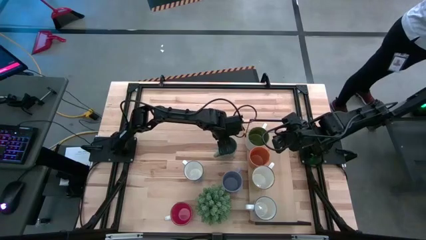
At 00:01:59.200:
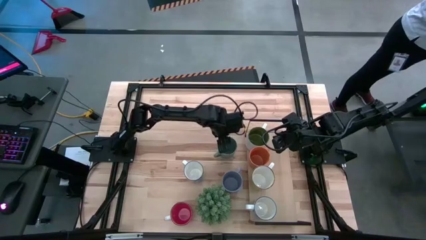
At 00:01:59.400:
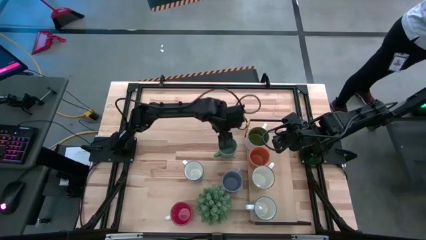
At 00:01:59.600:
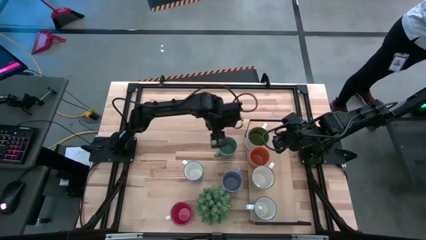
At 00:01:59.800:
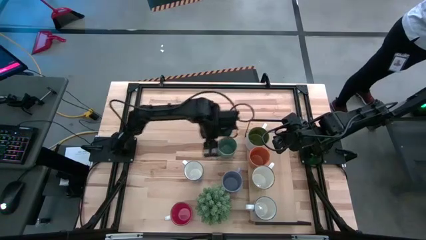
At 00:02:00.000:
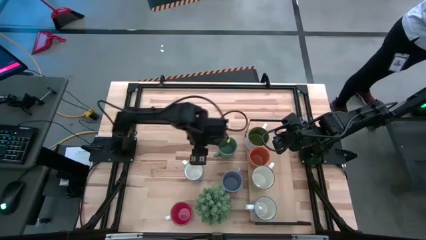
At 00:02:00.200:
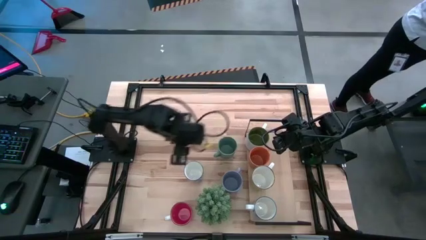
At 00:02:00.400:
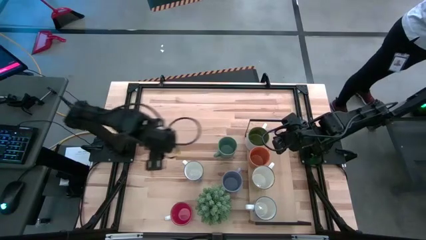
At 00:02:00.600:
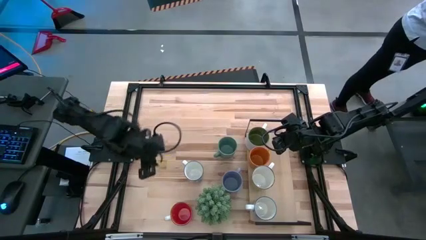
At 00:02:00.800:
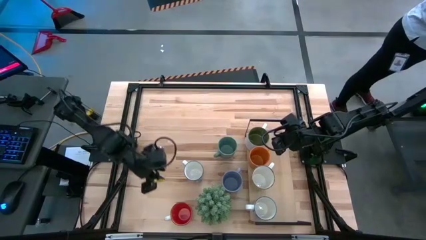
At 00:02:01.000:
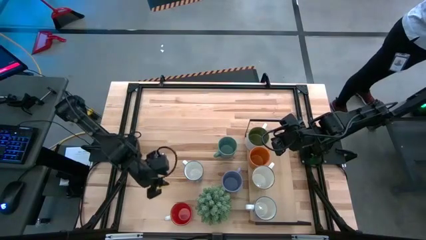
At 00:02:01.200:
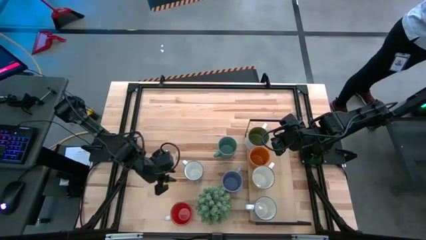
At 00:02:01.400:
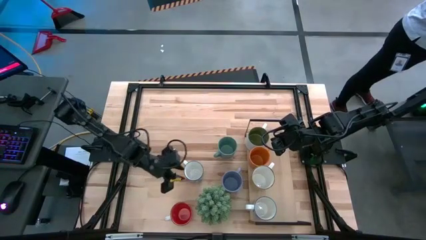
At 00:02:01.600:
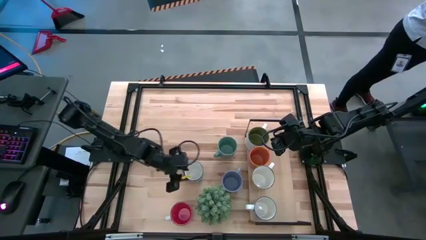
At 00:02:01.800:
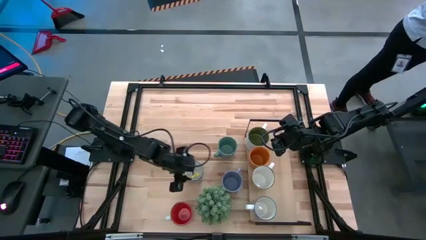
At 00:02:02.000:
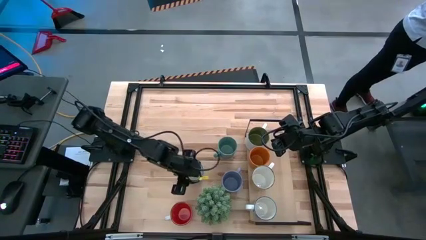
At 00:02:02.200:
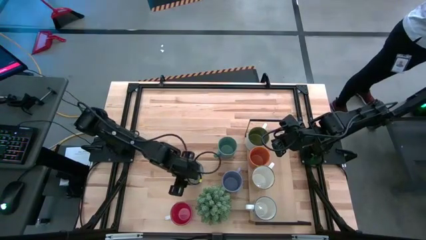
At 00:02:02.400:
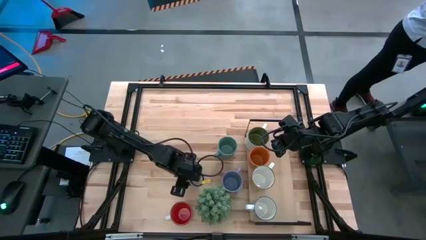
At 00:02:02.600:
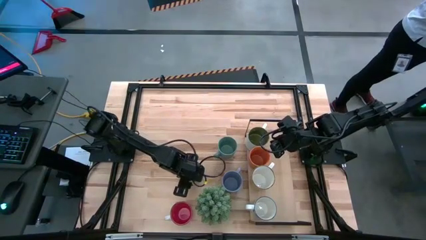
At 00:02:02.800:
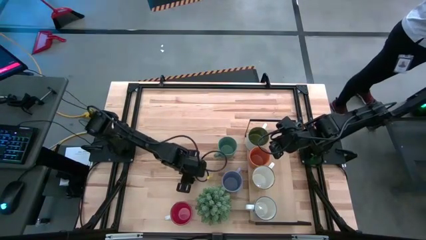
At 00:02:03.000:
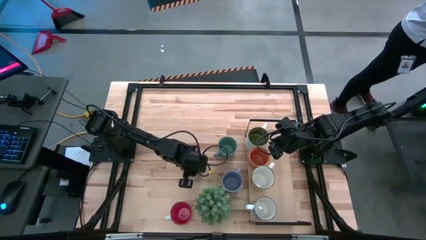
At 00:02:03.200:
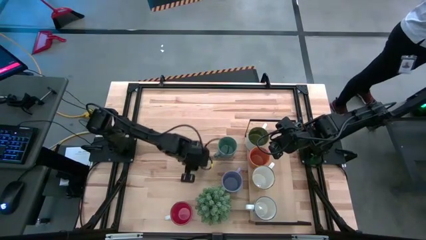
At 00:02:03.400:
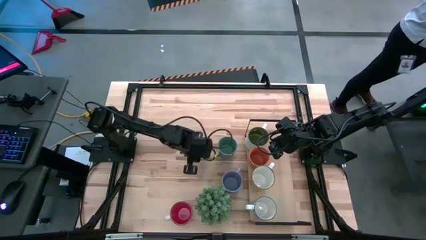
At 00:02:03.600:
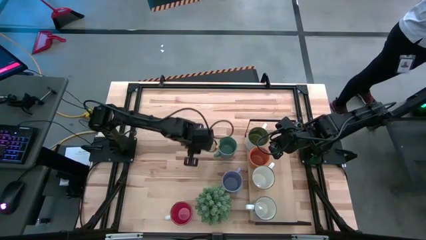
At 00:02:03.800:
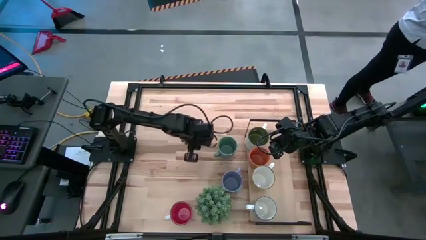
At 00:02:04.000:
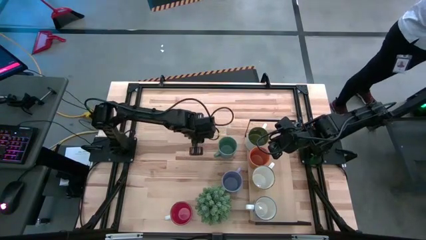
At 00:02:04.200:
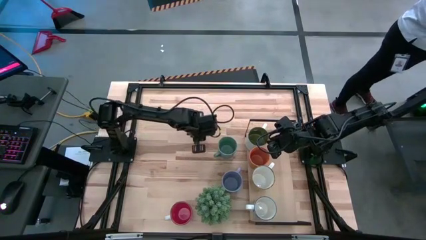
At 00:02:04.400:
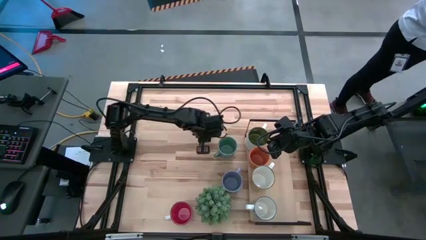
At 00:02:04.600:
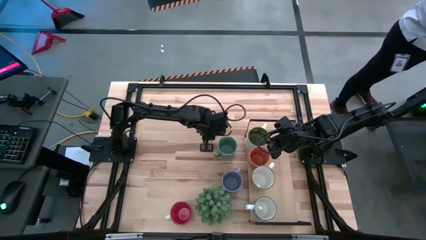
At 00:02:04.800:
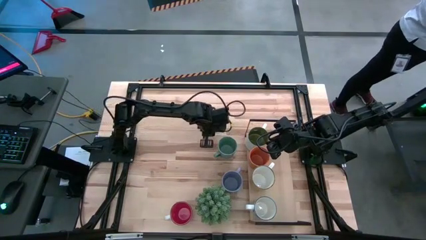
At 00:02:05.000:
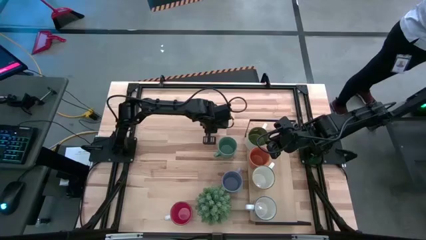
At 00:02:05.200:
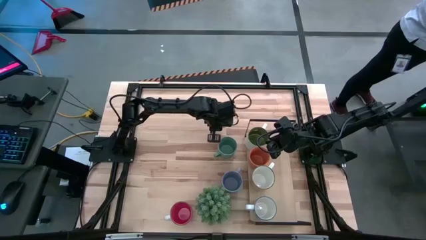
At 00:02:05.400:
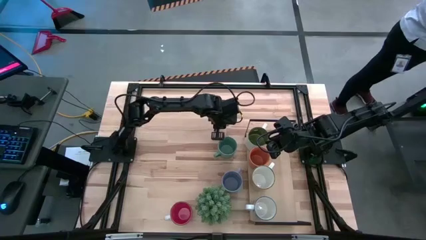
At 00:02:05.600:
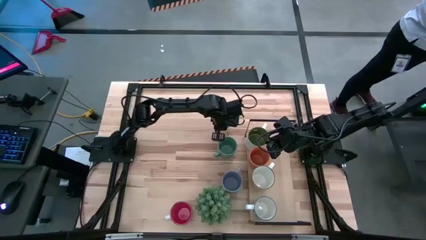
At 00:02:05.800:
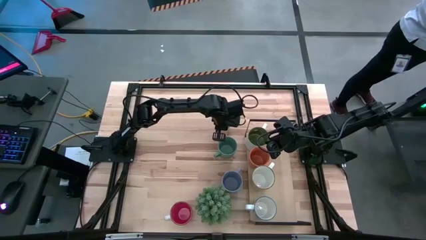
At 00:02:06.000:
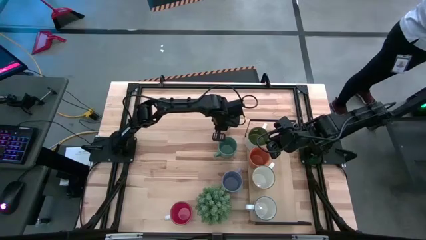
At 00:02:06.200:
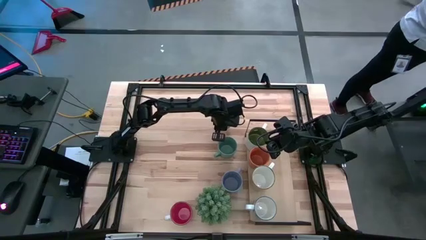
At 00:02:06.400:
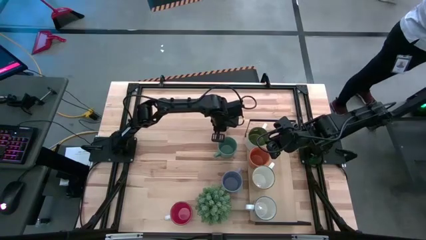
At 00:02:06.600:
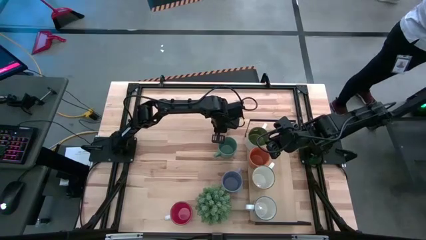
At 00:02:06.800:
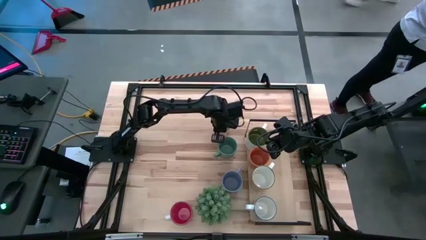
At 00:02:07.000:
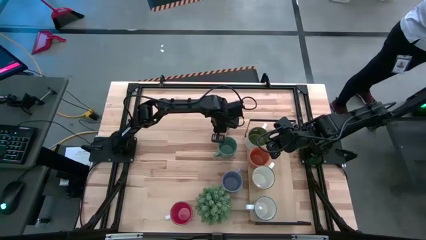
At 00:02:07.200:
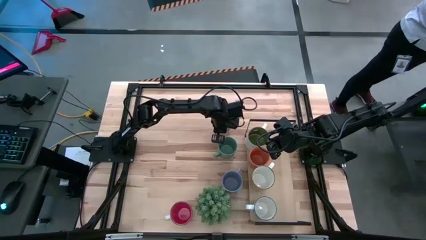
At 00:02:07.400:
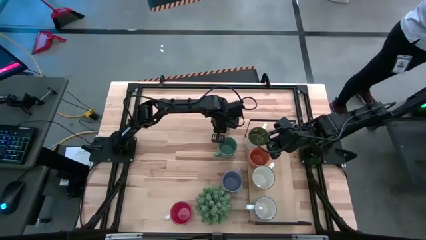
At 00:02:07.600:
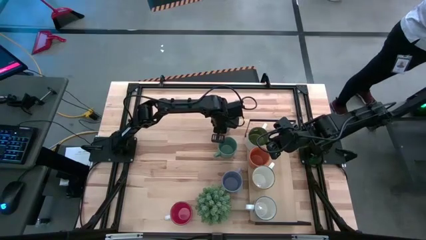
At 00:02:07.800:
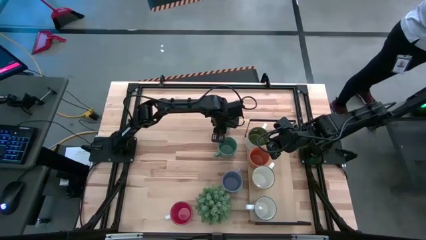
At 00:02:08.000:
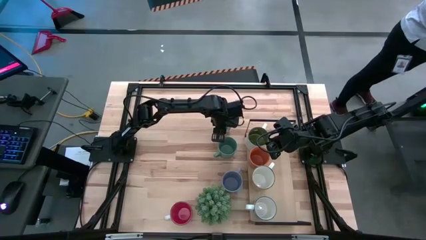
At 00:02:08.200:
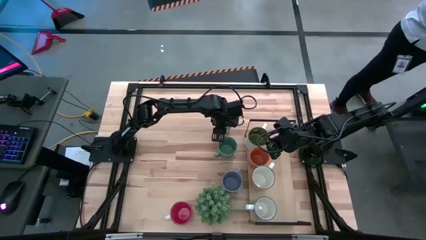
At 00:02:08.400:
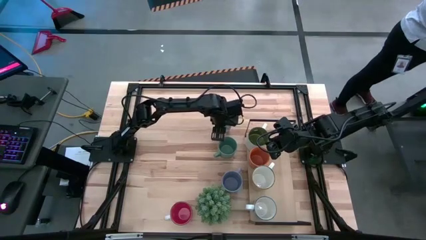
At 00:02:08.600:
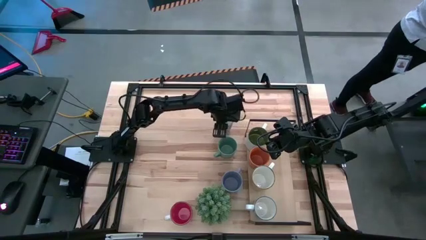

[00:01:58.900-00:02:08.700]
Task: Place coffee mugs
Move the blue mug to the upper middle of the table

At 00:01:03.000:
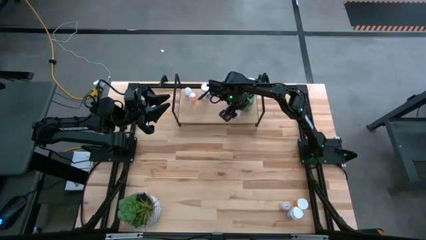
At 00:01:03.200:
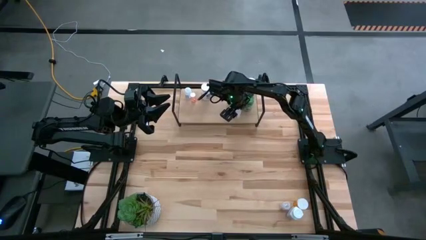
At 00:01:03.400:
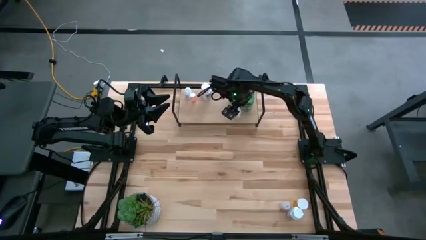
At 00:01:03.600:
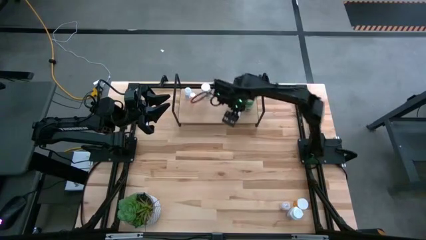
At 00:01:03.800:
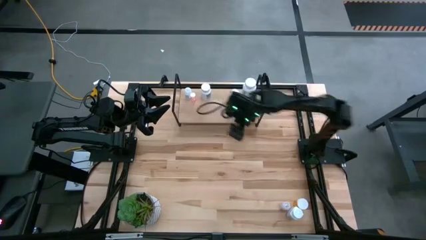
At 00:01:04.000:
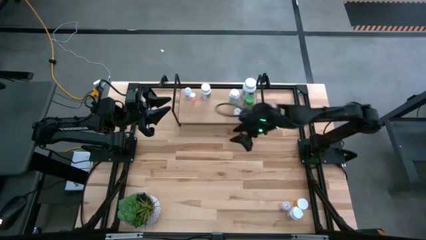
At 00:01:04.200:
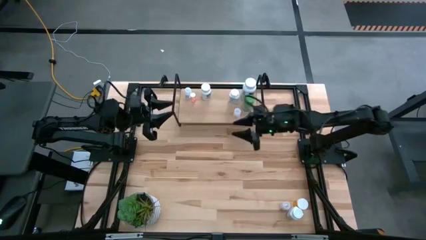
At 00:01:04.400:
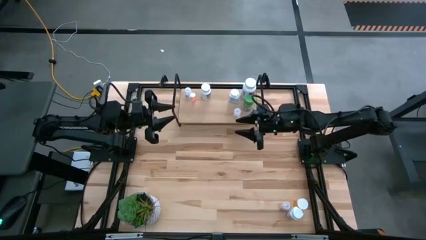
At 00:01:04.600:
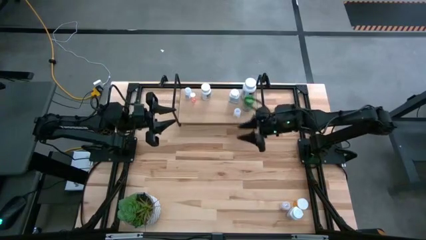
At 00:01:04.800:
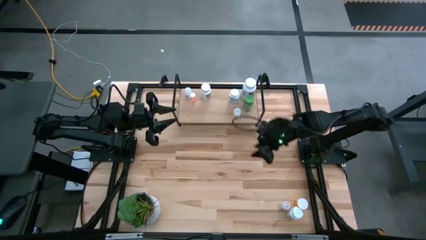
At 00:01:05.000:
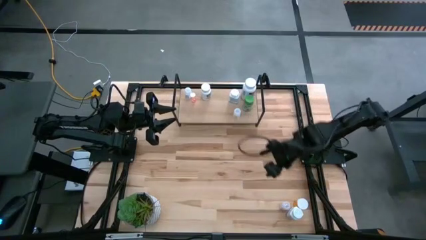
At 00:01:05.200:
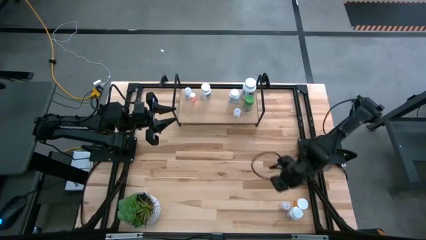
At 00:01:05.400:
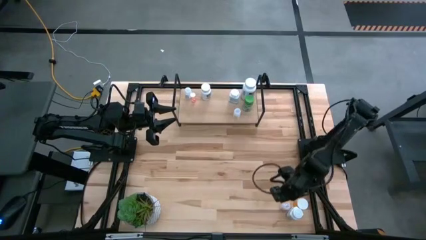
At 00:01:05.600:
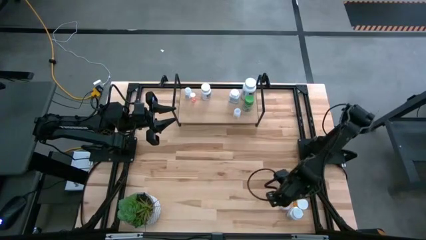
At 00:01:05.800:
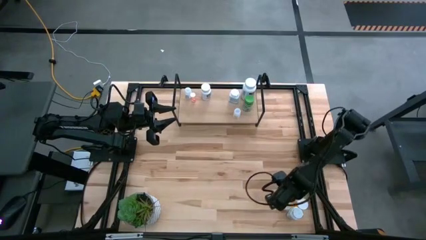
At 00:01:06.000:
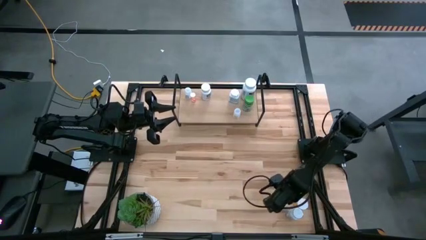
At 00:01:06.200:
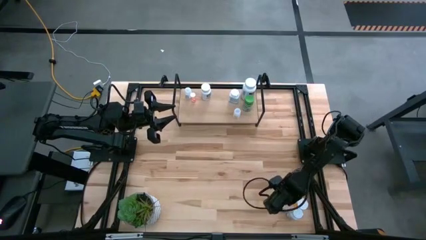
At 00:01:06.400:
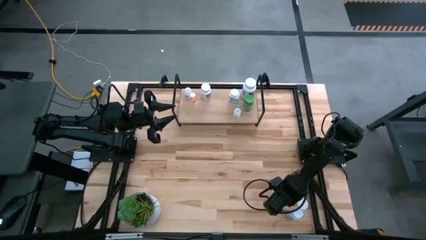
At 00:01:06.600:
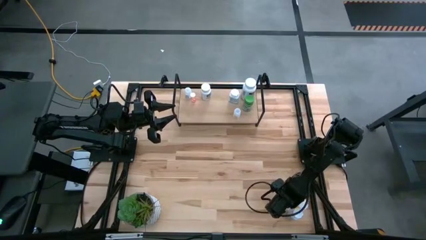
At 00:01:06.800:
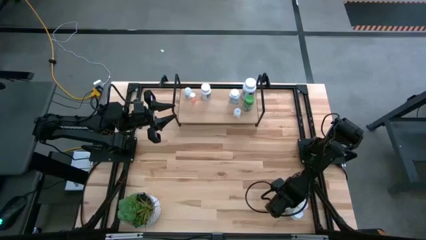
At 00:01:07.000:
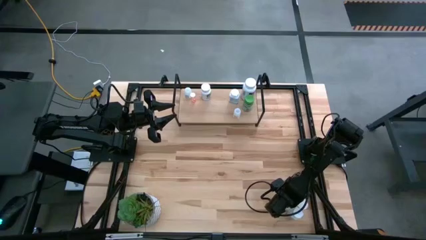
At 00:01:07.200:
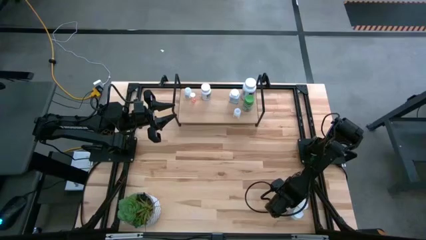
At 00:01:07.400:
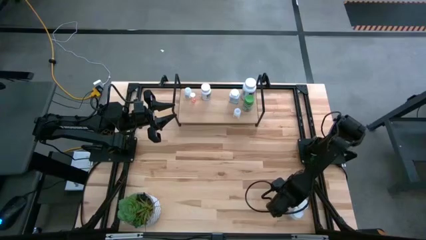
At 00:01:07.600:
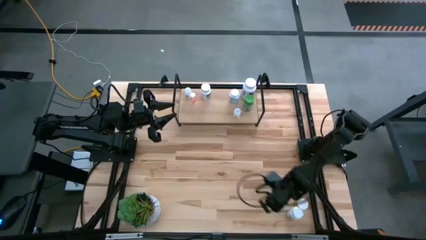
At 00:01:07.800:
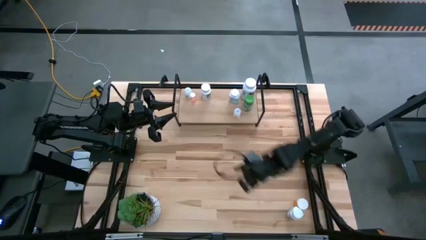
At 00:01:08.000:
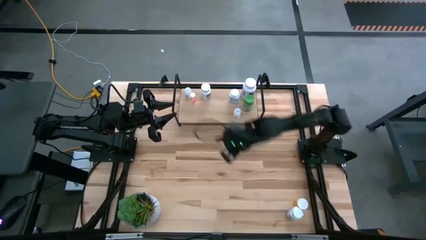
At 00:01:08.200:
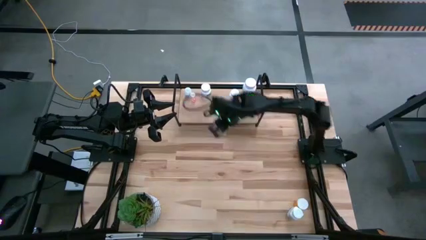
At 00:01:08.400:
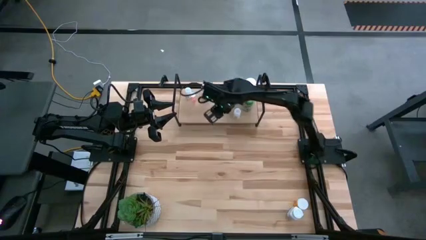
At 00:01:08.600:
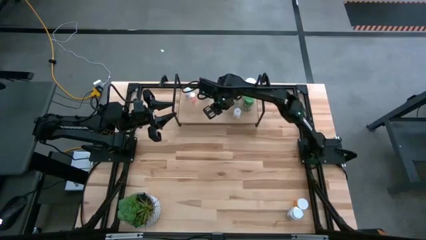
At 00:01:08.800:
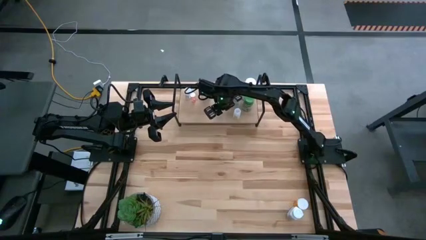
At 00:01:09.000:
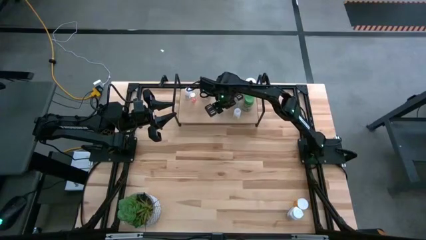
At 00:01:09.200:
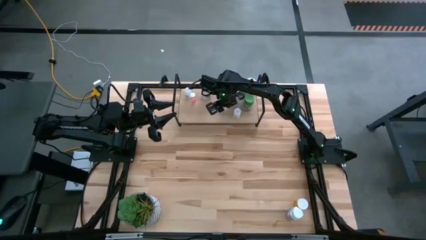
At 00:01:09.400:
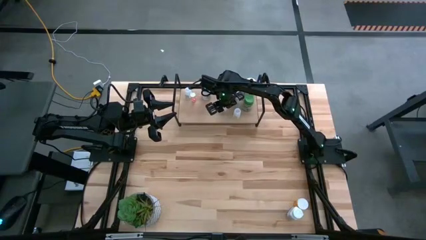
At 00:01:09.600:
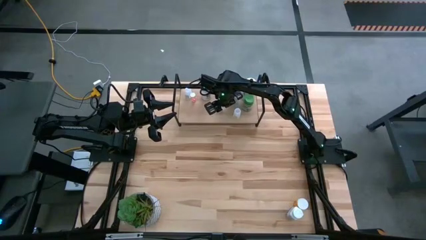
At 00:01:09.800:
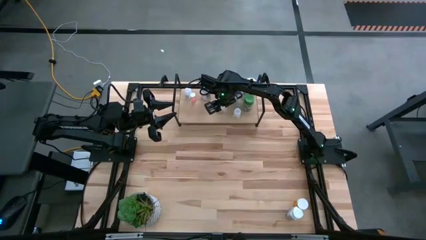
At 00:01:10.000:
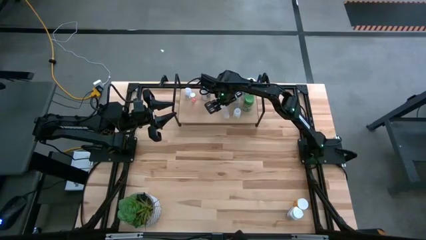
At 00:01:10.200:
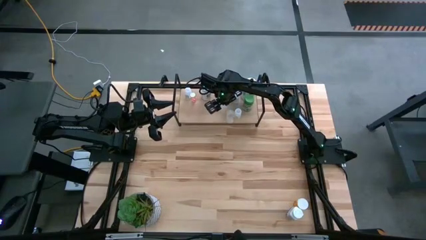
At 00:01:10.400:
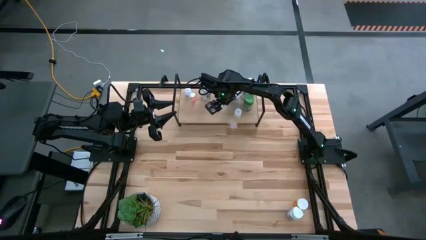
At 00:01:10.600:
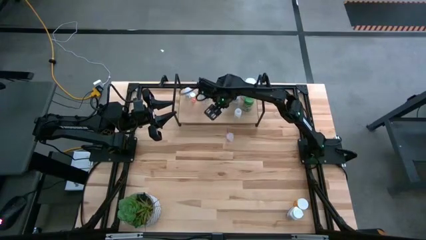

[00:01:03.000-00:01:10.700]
Task: Pick and place medicine bottles onto shelf by color
Put the transparent pill bottle on the shelf
